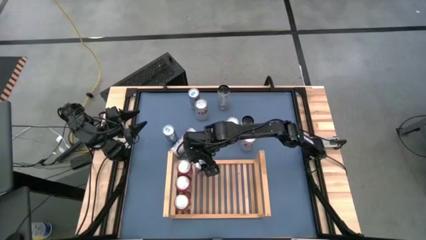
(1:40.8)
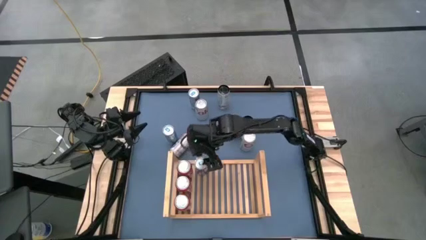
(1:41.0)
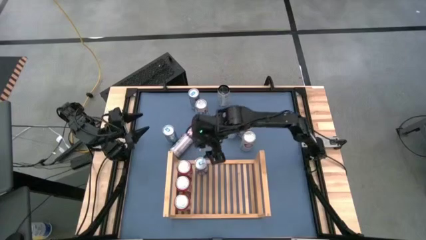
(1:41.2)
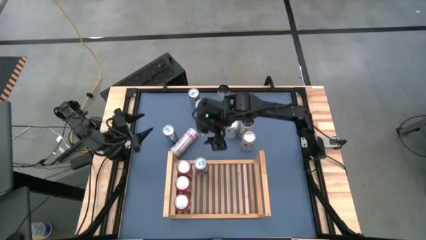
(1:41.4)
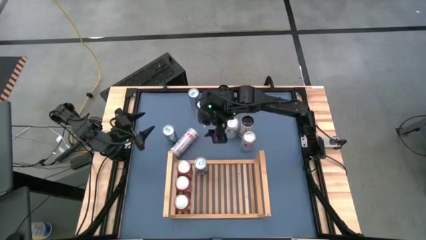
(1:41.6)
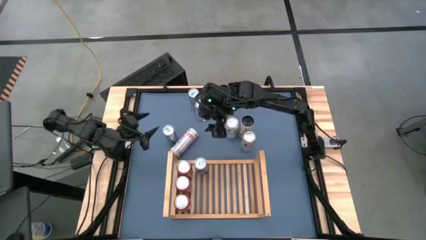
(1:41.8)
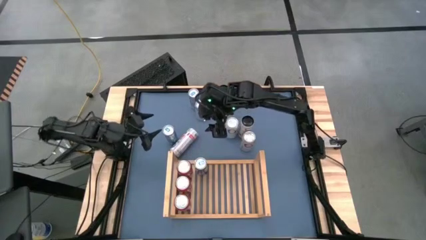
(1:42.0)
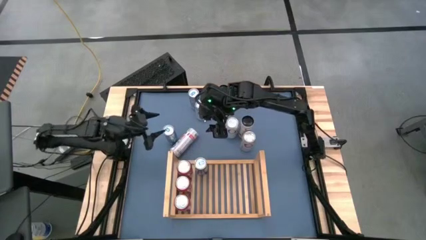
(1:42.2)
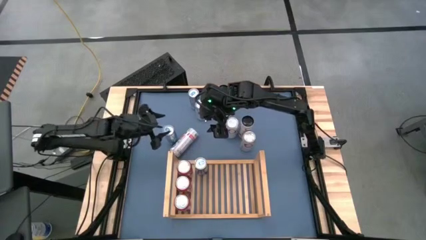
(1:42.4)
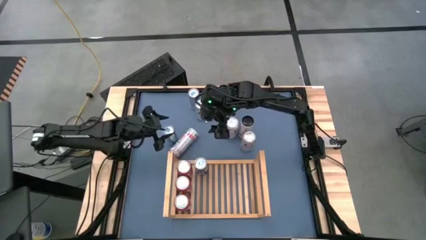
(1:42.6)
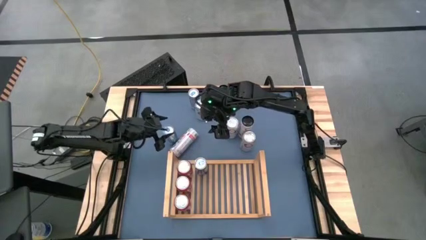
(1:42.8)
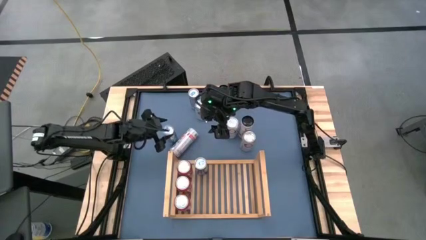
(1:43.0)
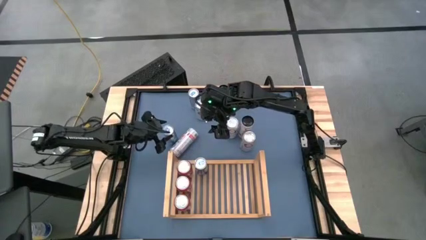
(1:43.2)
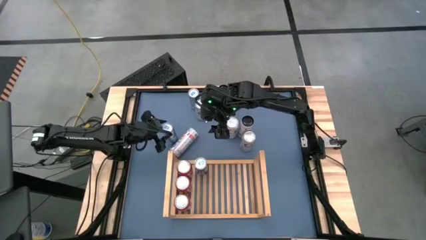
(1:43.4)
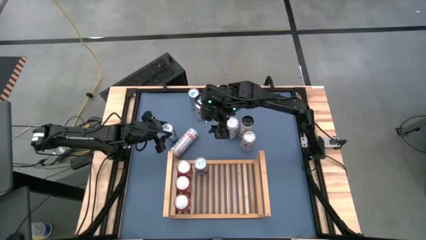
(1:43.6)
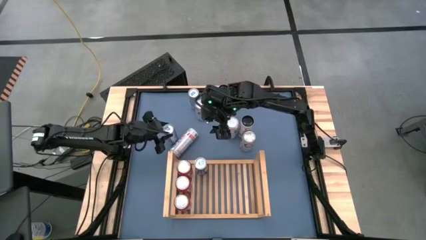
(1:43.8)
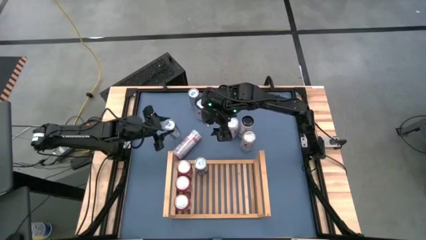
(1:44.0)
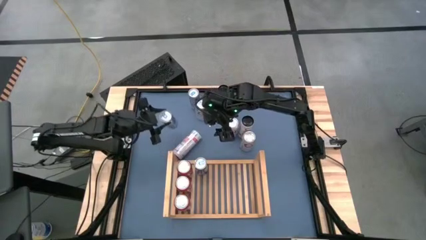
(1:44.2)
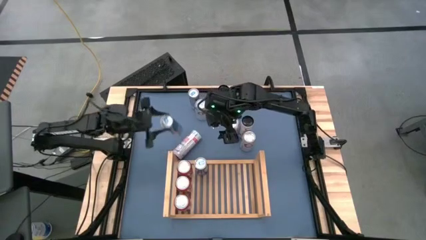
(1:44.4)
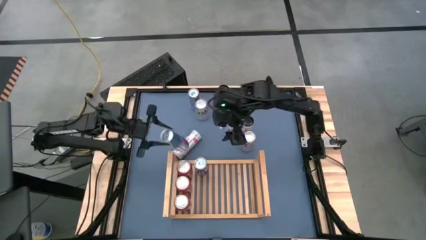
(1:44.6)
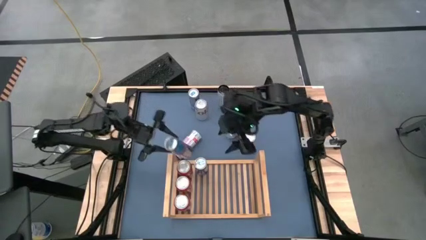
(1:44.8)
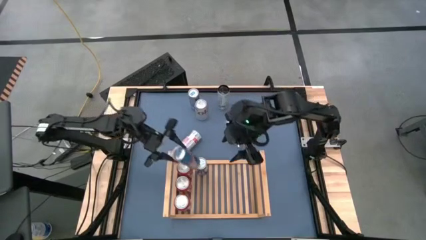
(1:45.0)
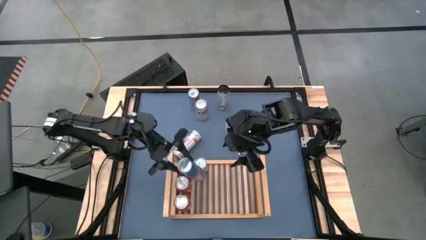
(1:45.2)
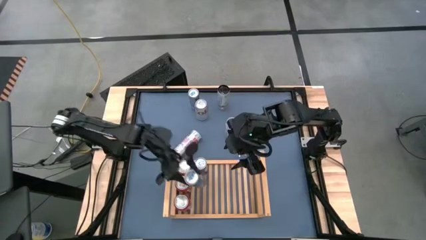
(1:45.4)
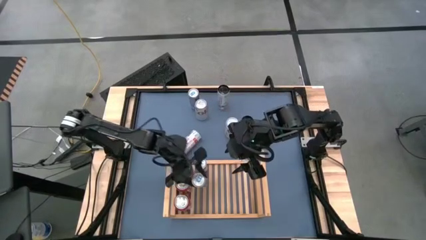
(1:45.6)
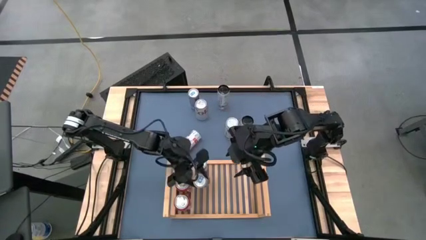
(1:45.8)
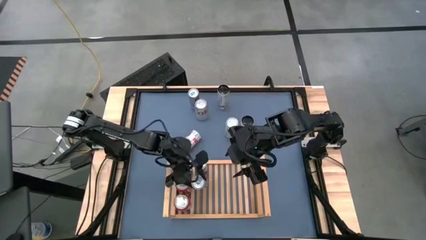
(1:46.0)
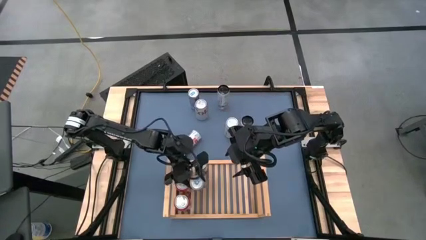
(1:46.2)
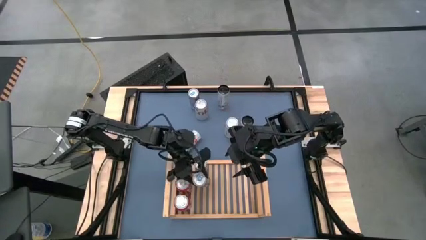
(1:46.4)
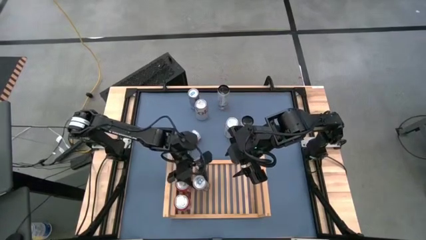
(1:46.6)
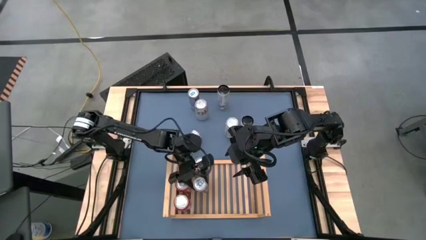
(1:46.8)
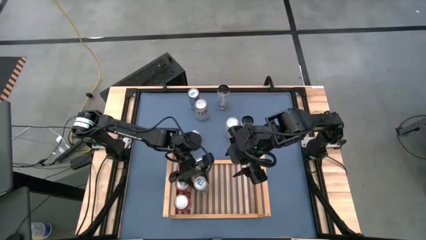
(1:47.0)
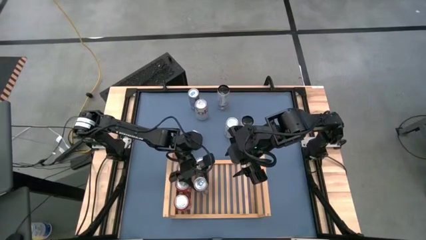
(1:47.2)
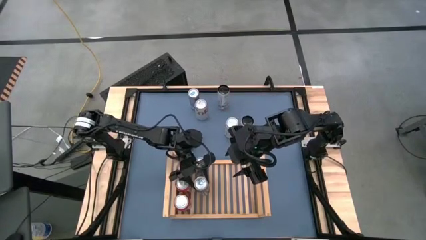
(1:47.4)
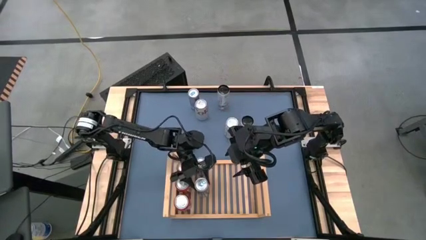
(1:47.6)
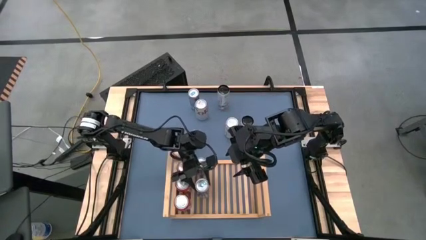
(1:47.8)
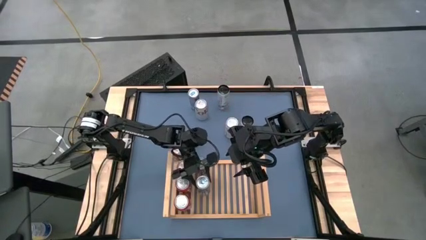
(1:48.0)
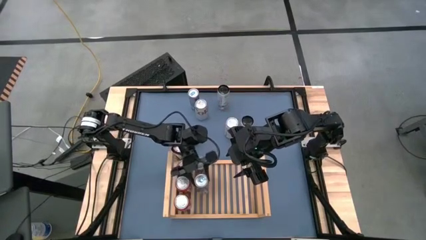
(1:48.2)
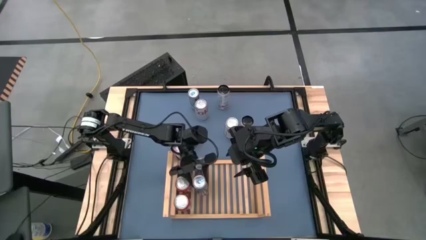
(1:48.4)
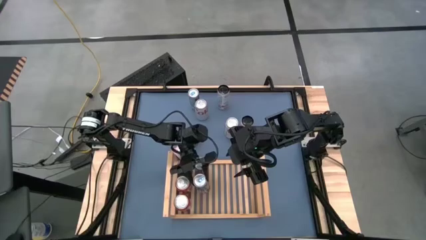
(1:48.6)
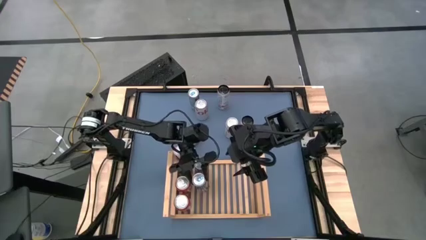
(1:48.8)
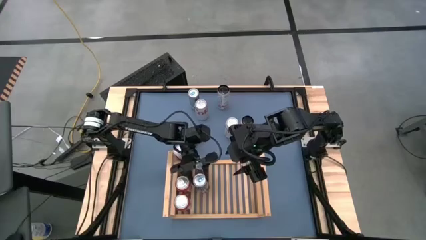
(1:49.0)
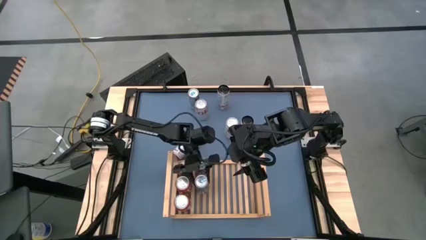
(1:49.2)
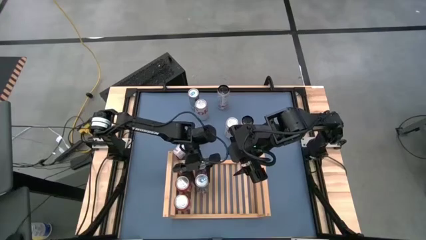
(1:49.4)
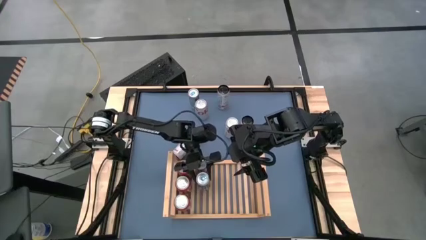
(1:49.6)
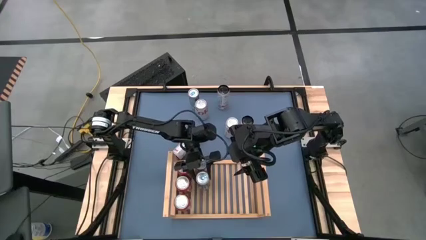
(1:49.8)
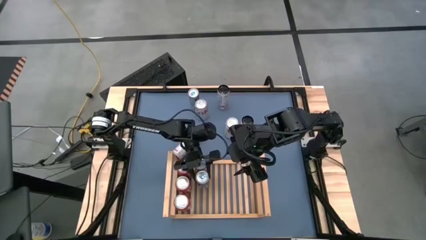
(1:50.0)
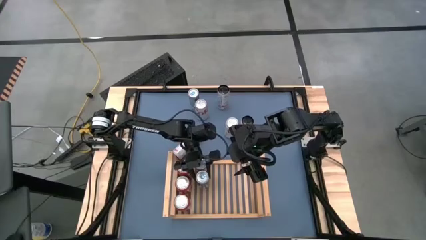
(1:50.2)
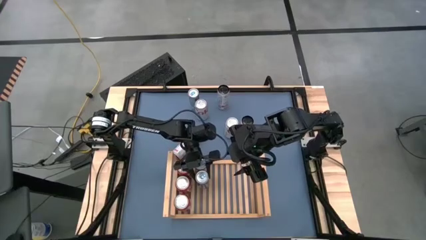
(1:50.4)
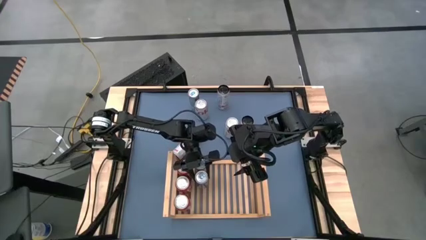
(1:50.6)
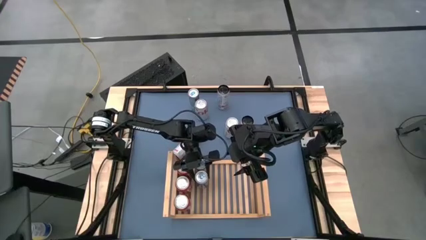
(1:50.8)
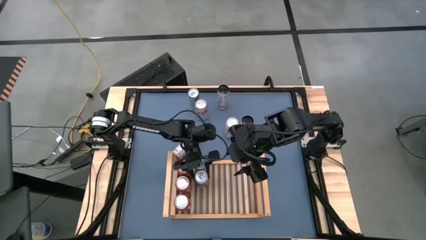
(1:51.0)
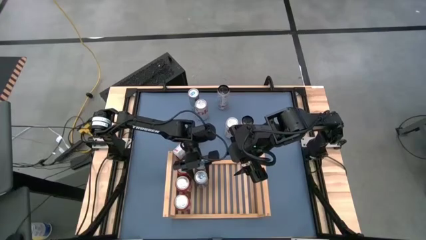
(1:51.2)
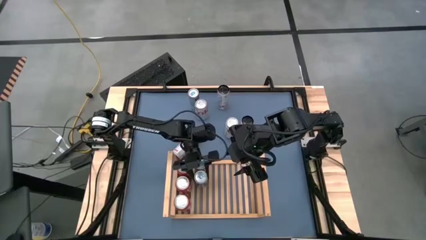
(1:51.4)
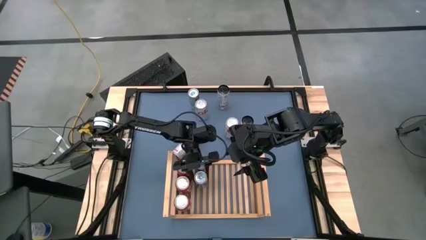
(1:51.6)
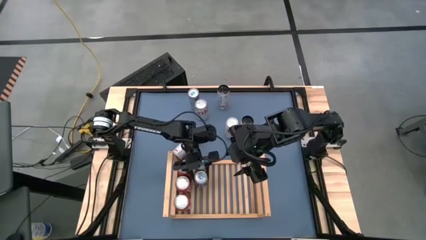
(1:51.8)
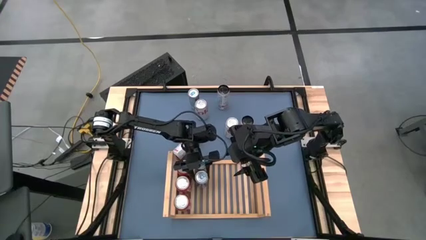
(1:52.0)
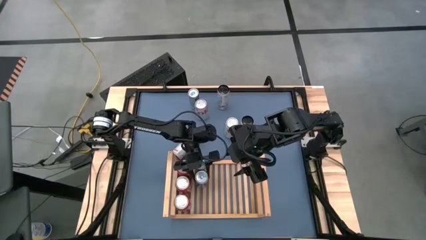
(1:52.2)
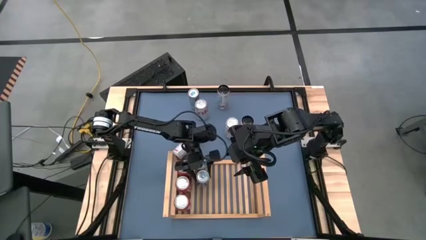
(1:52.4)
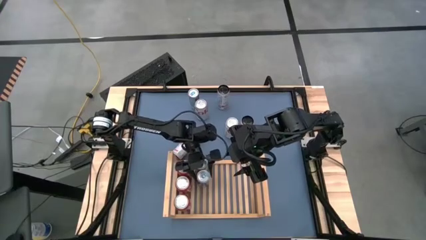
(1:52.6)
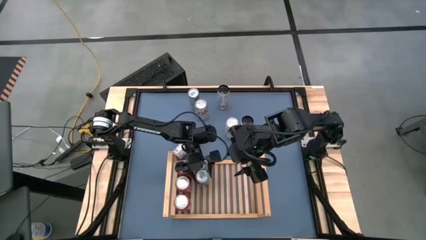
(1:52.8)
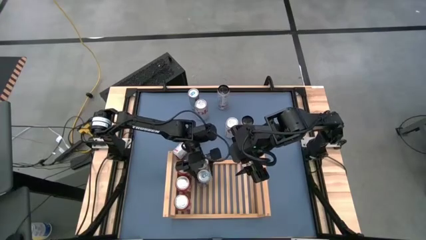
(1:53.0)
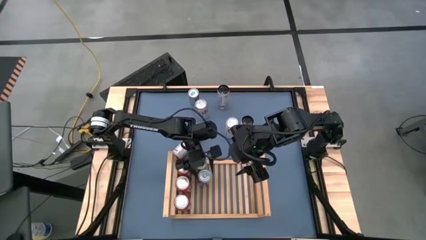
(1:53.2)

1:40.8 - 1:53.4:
Task: Place canned beverage on shelf
Put the left blue soda can on the shelf aligned with the other blue soda can

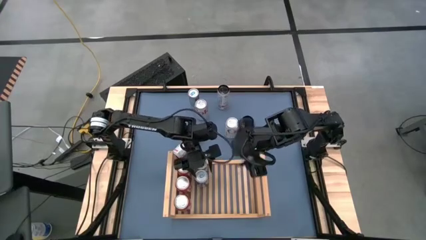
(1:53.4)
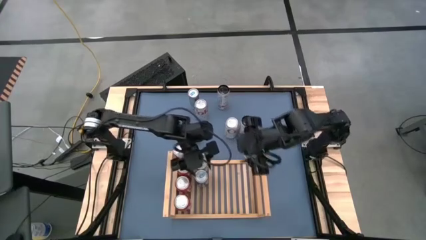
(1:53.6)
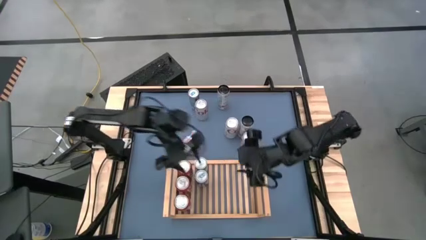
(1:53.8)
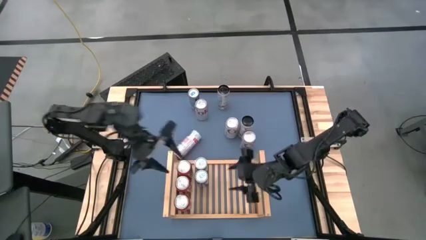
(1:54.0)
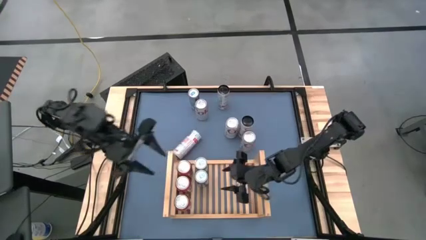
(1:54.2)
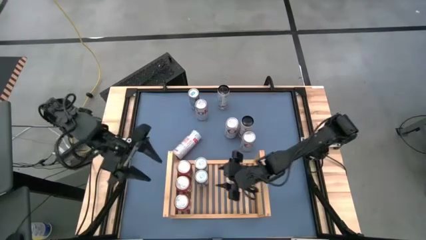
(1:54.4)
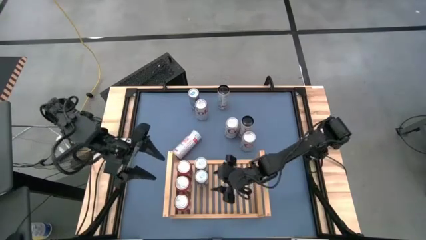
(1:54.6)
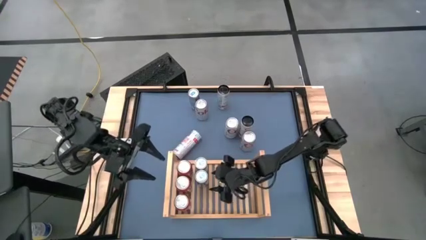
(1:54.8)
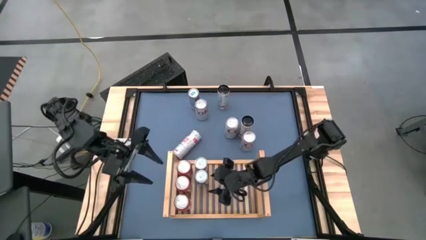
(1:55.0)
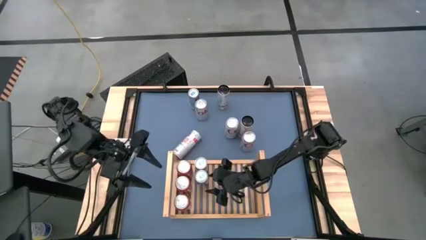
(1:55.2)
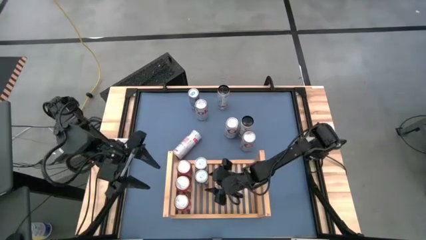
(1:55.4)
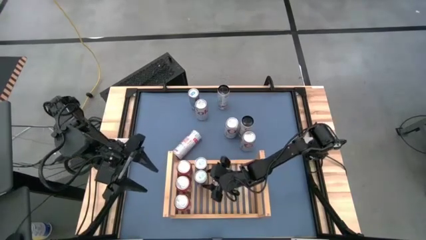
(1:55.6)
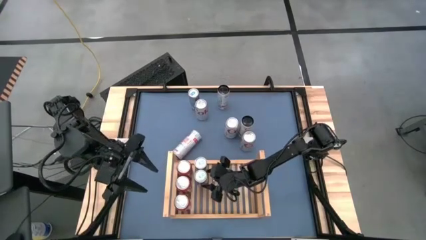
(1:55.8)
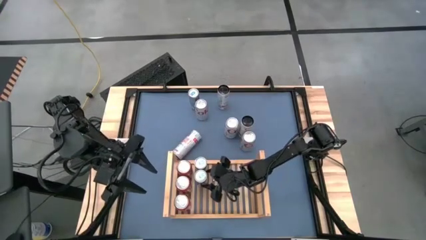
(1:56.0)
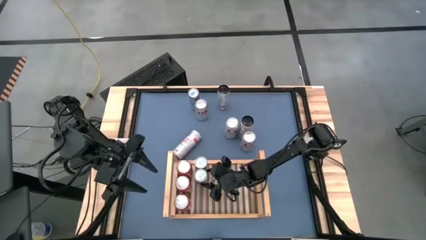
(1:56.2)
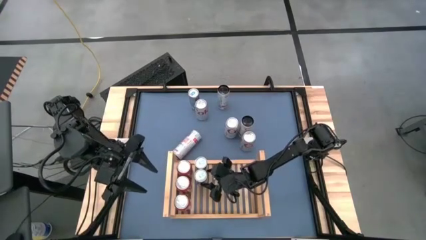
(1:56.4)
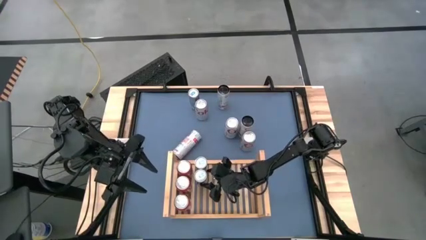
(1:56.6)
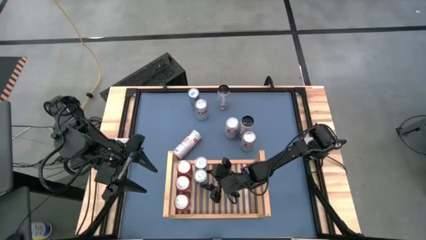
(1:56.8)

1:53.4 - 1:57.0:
Adjust the blue soda can on the shelf
